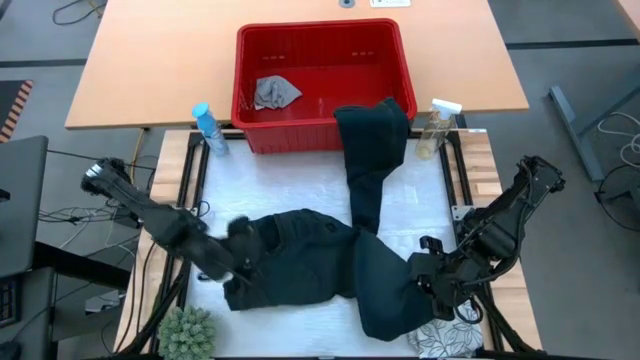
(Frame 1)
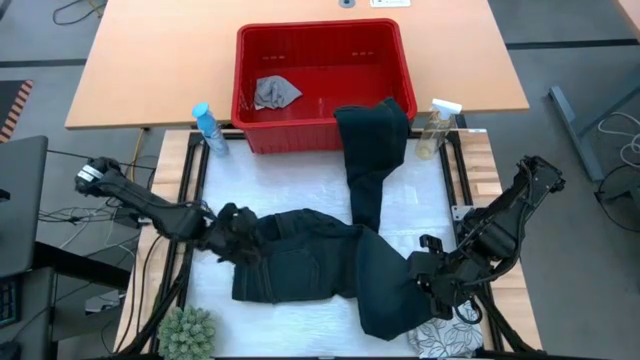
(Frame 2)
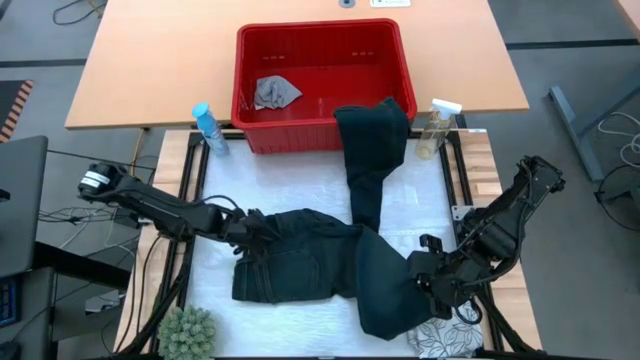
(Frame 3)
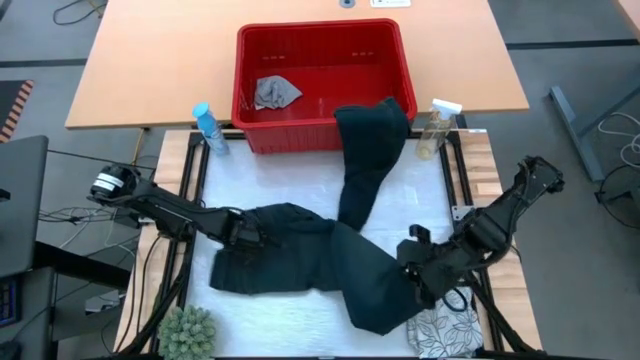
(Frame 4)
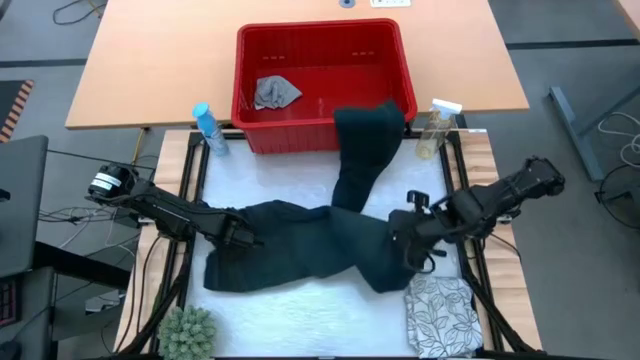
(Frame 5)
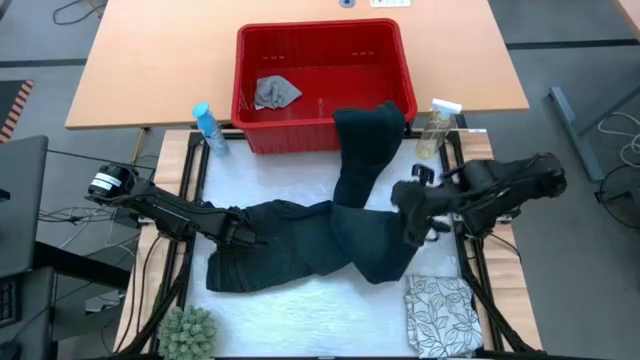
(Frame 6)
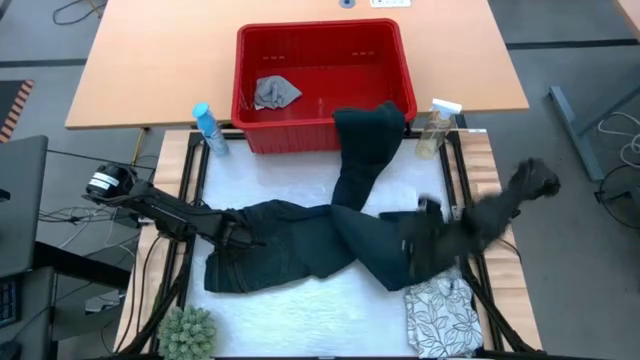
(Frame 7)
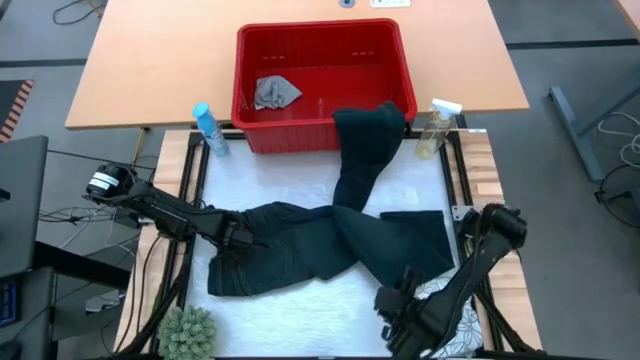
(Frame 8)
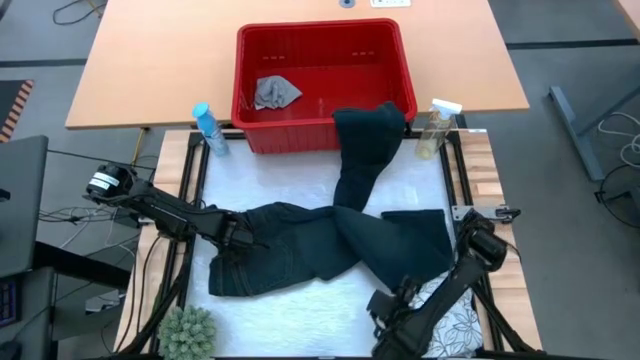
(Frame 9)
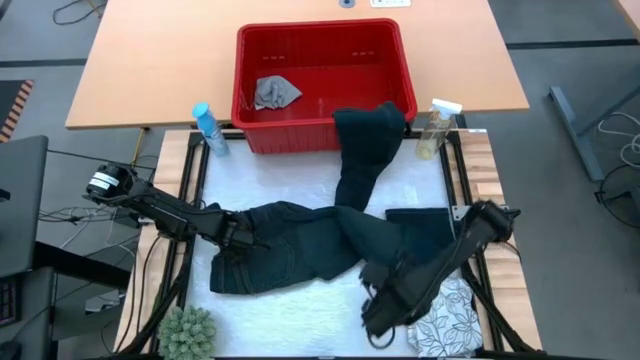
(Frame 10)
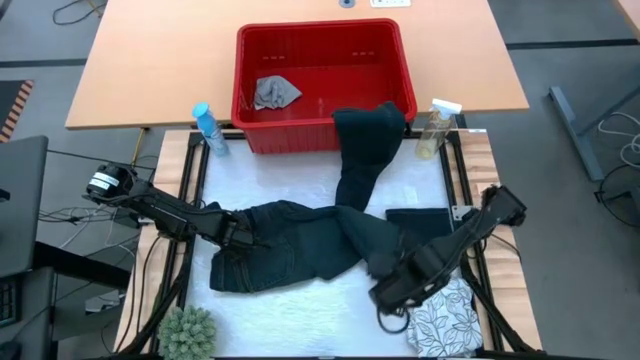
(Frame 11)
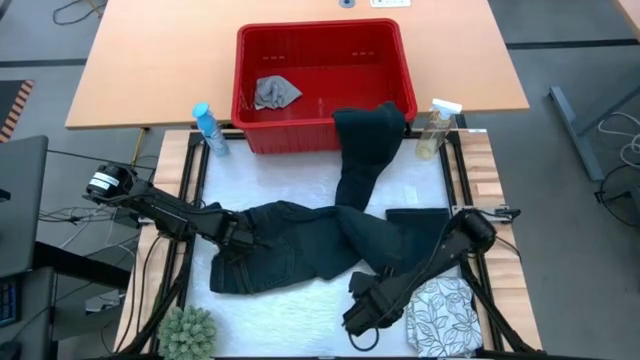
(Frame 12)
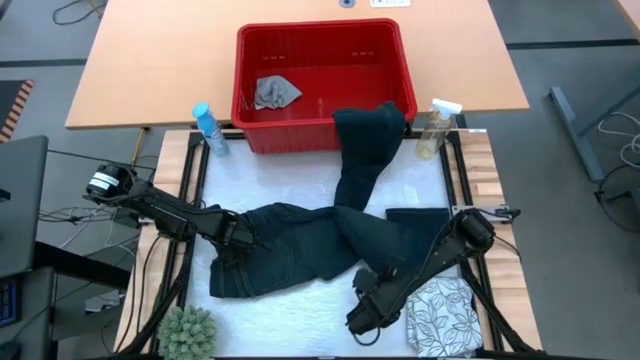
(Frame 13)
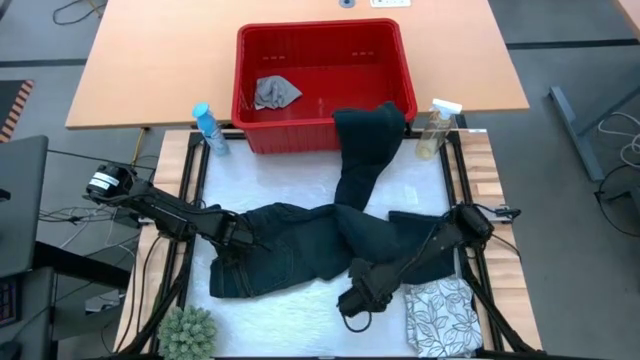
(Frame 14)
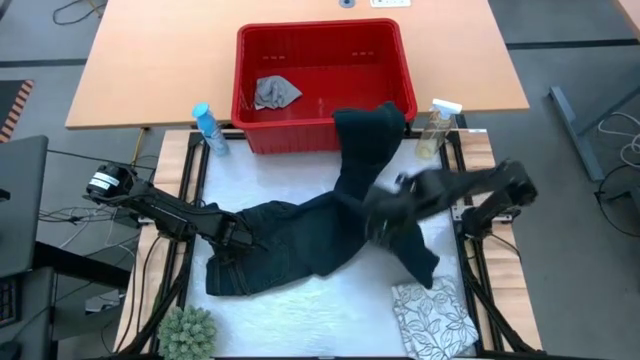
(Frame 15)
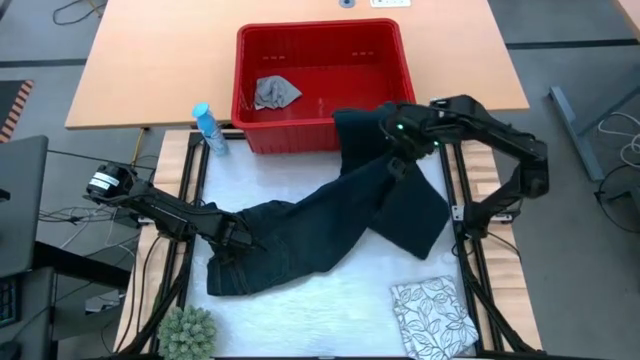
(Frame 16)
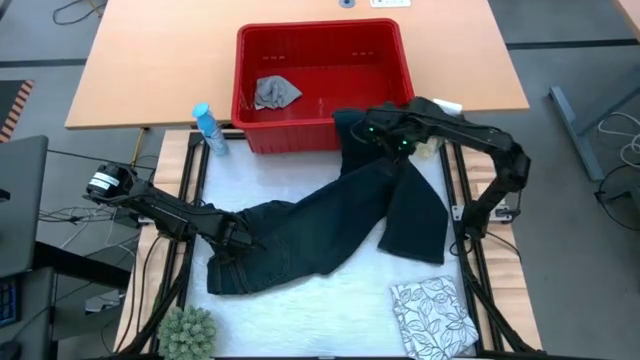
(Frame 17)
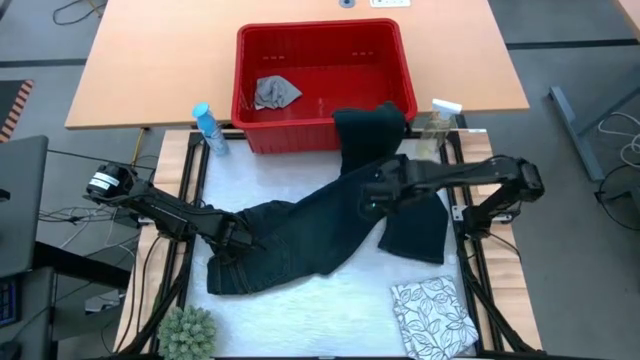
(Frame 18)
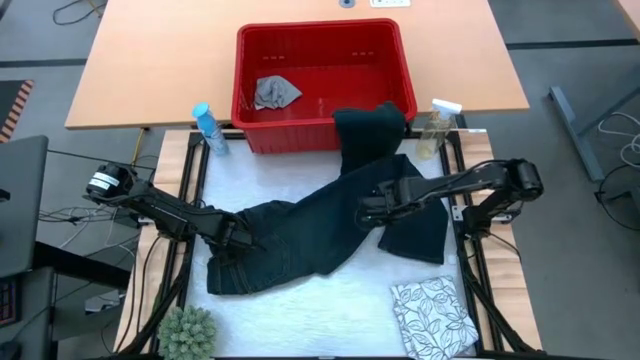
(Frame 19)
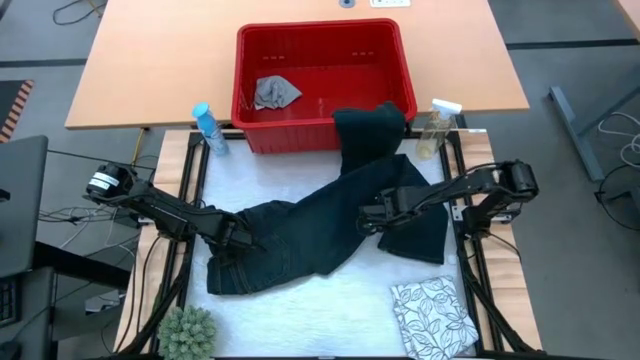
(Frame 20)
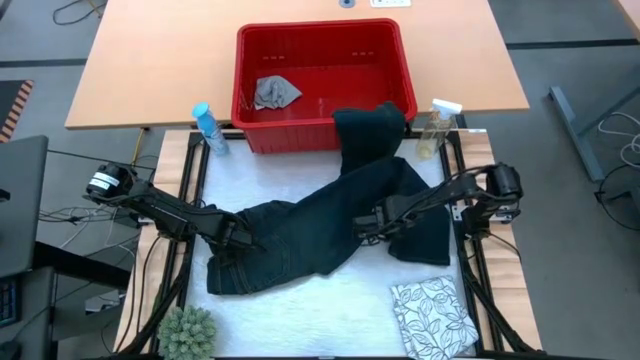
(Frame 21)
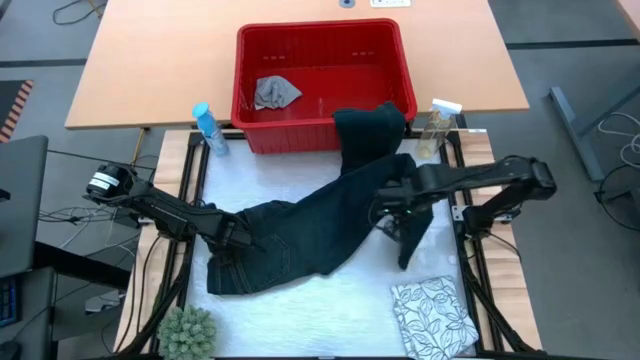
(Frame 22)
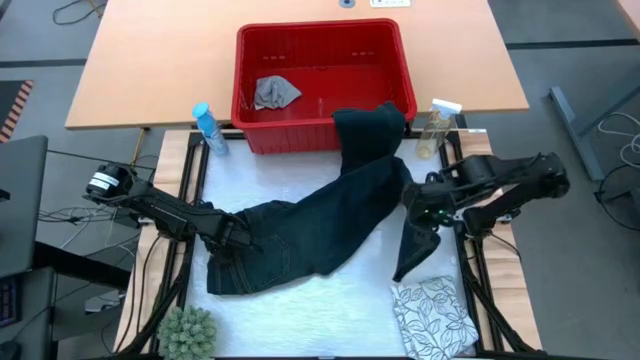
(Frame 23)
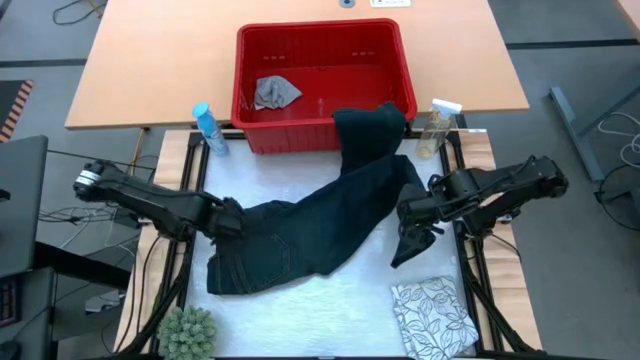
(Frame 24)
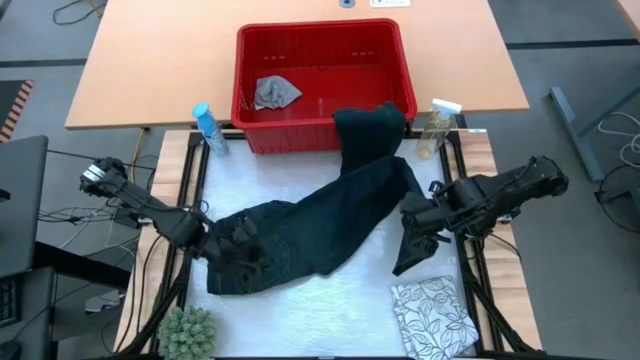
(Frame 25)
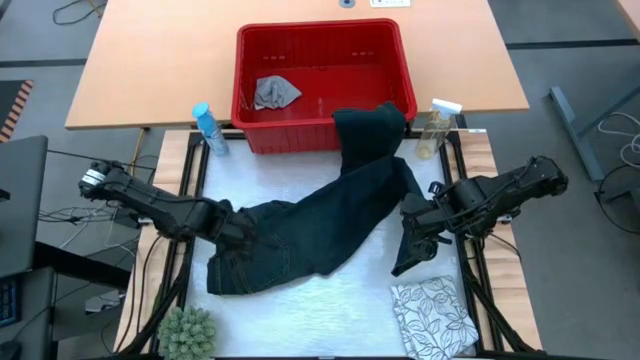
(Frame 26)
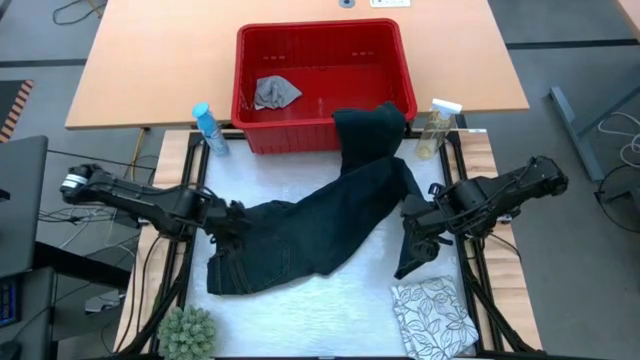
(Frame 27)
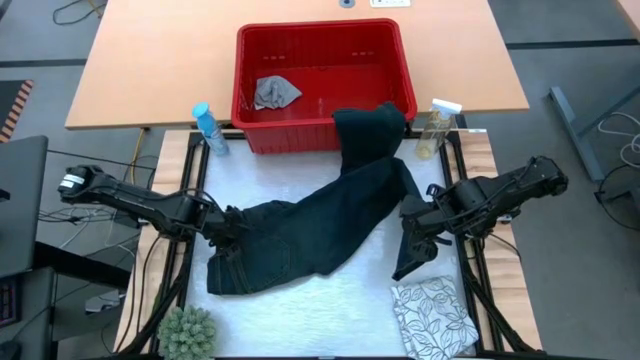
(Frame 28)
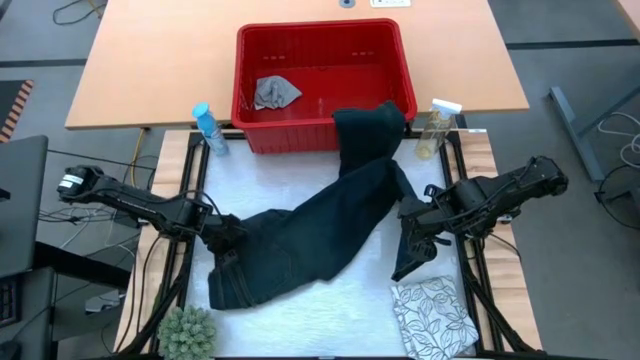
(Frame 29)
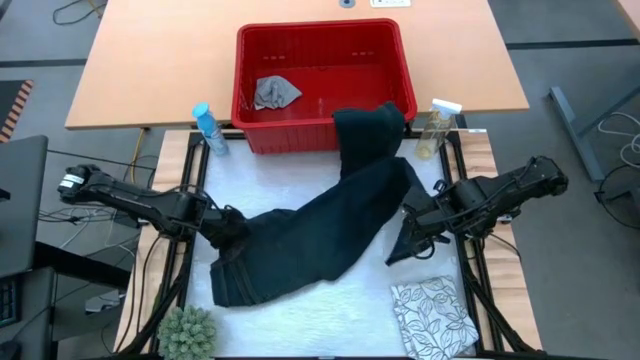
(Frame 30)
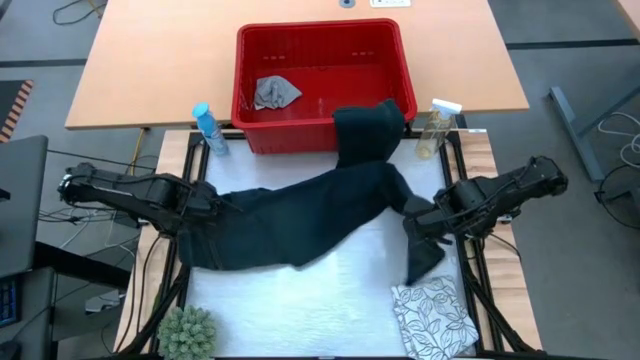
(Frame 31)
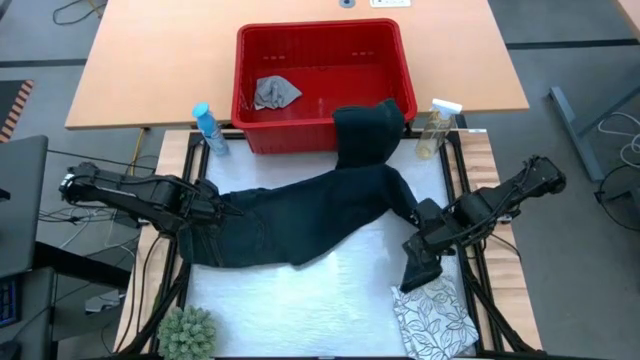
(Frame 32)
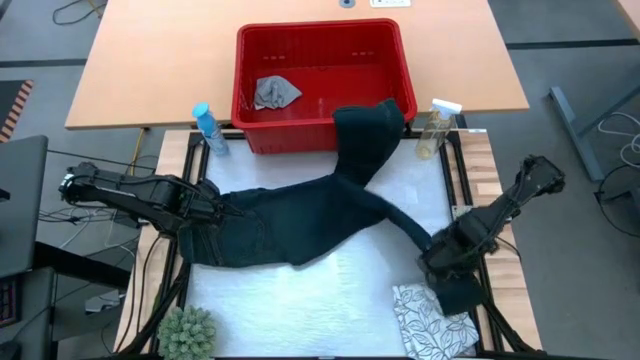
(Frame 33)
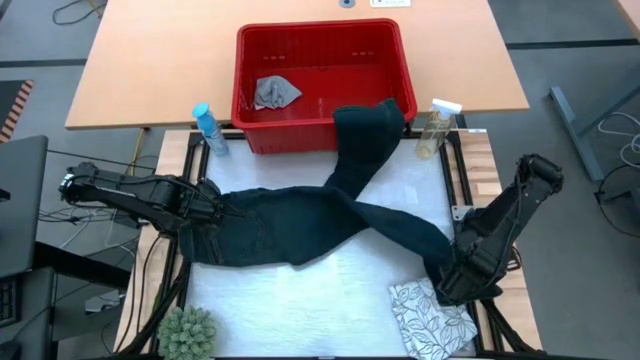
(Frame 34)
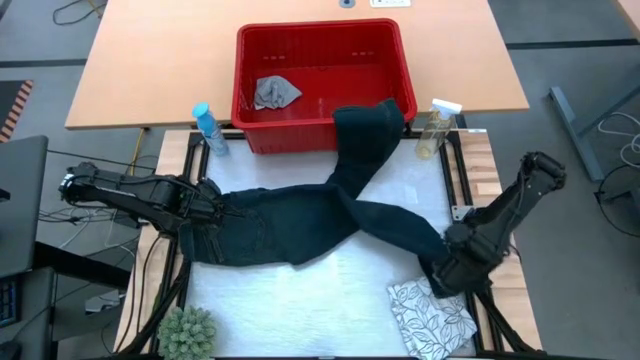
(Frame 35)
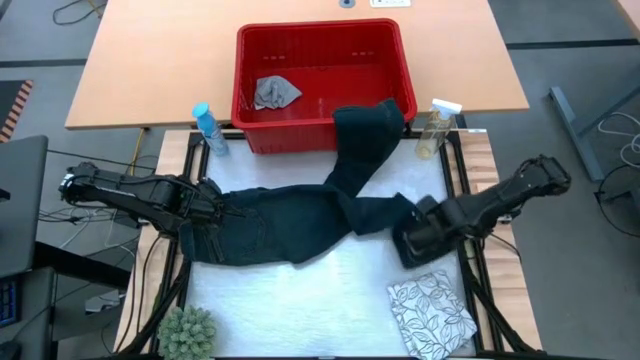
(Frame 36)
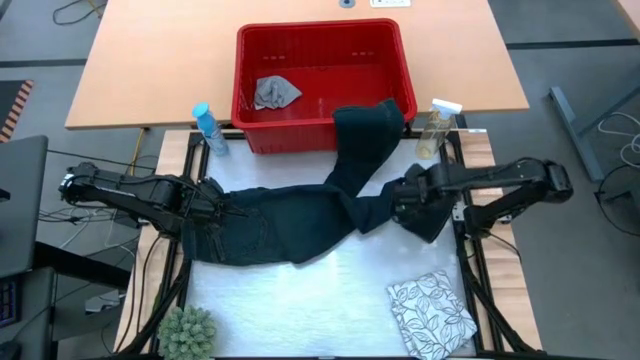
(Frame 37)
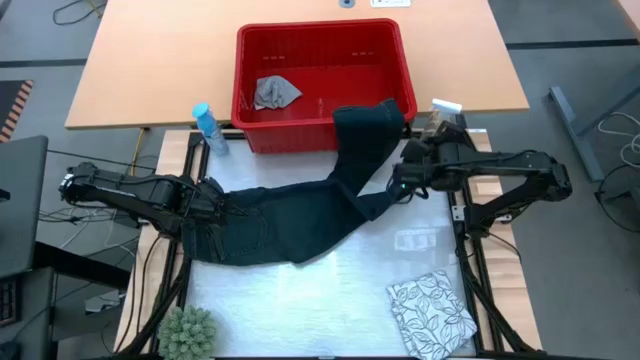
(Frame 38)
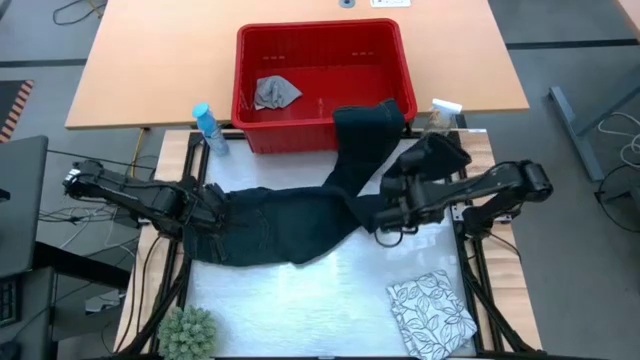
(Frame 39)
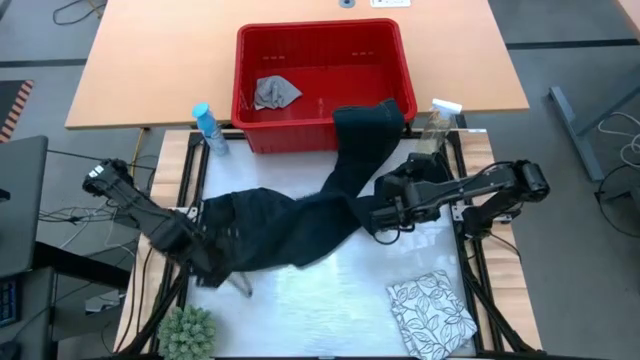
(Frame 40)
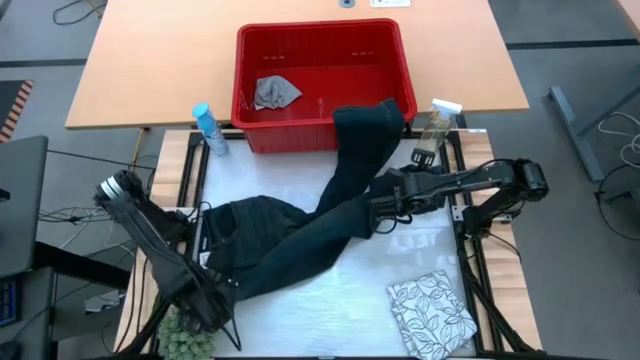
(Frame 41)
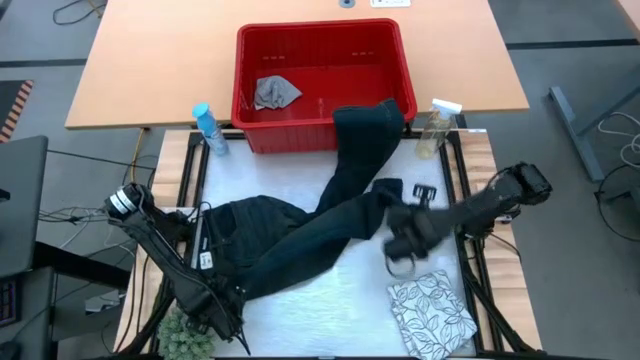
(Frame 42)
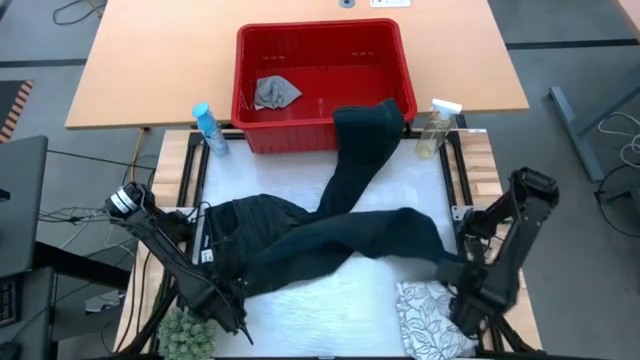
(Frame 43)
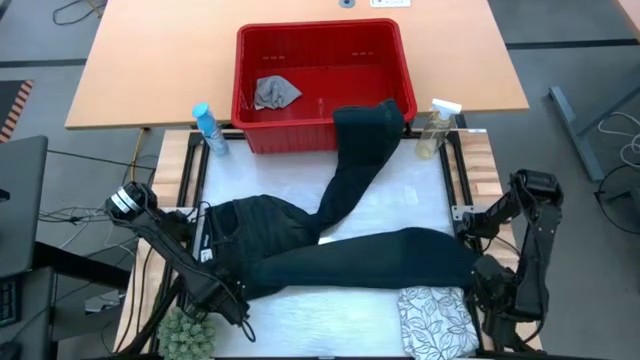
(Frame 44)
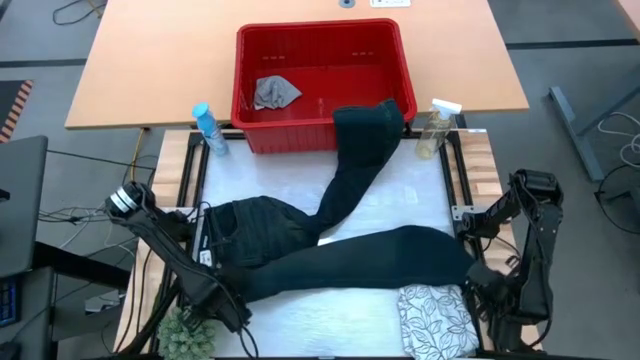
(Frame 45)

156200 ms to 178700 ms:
Task: Fold laundry
Fold the dark blue pants
